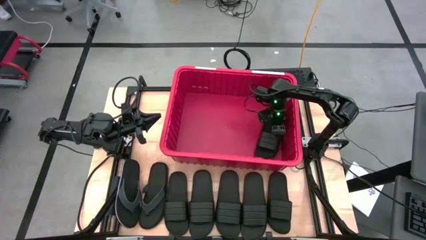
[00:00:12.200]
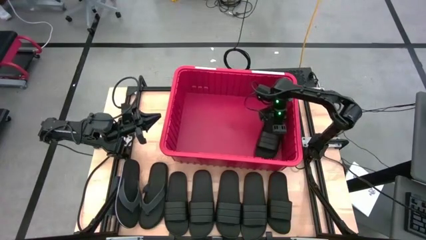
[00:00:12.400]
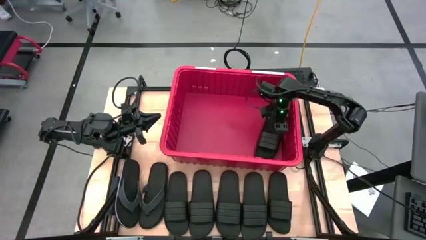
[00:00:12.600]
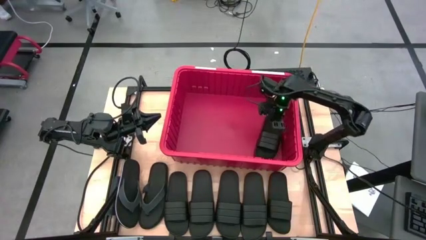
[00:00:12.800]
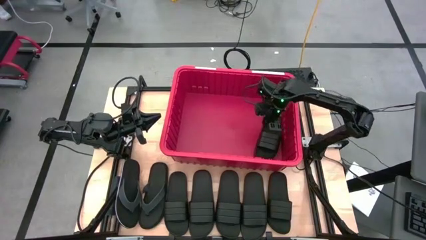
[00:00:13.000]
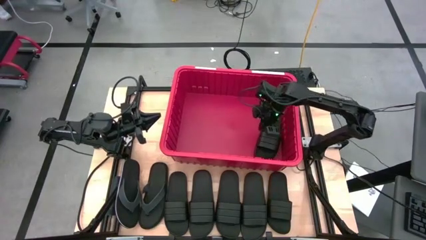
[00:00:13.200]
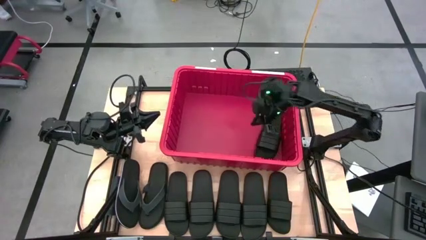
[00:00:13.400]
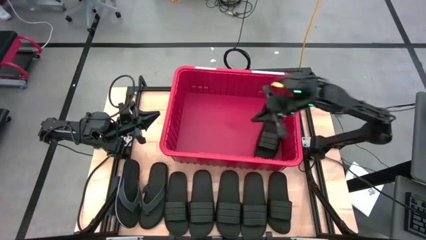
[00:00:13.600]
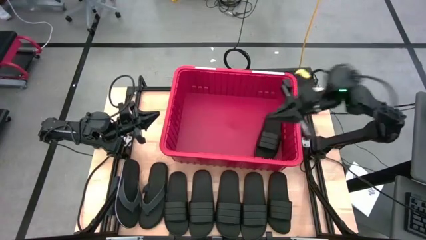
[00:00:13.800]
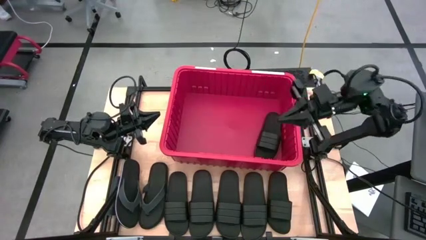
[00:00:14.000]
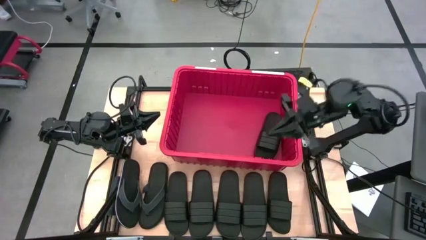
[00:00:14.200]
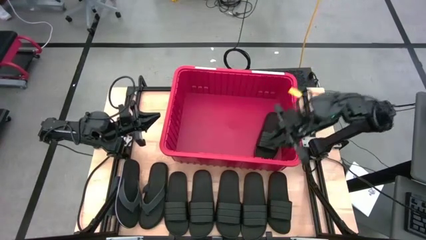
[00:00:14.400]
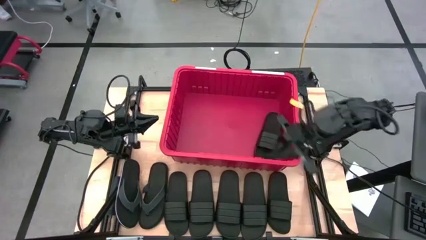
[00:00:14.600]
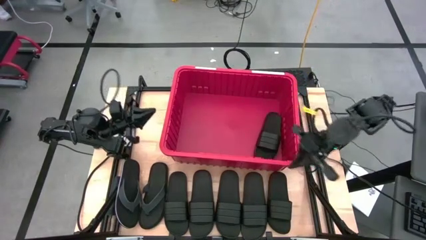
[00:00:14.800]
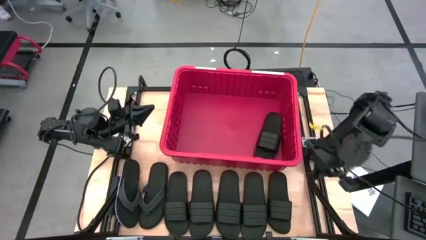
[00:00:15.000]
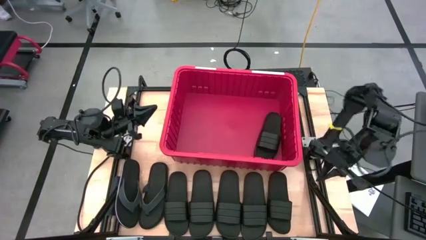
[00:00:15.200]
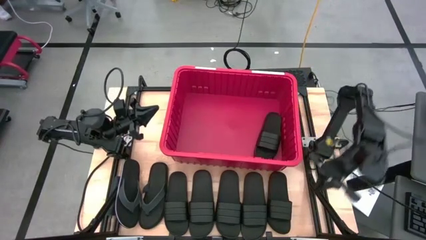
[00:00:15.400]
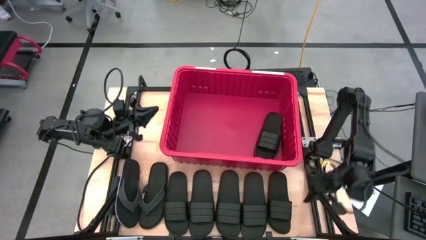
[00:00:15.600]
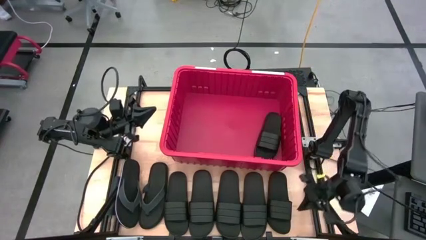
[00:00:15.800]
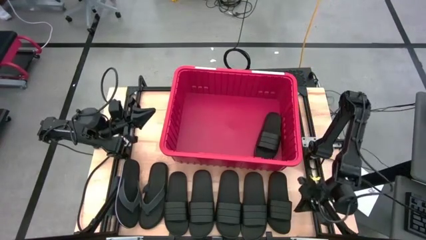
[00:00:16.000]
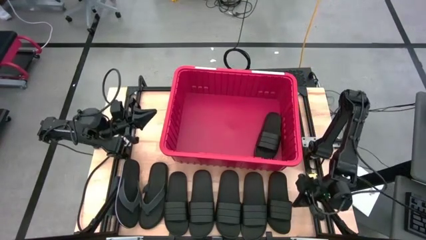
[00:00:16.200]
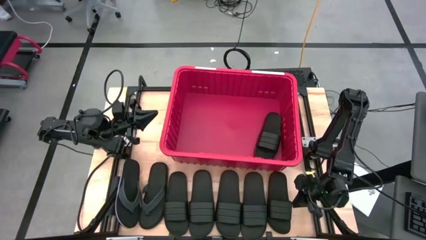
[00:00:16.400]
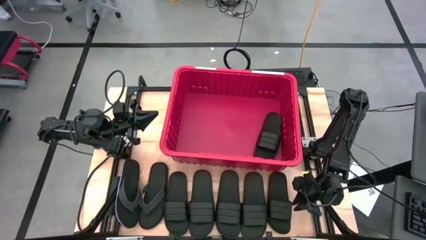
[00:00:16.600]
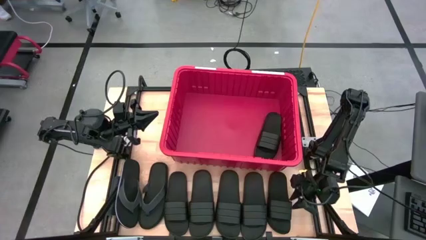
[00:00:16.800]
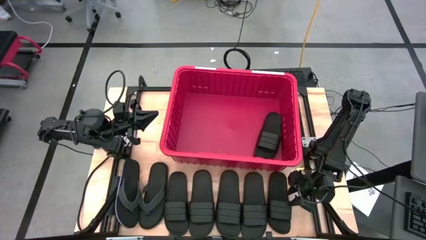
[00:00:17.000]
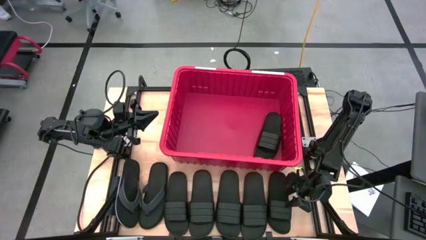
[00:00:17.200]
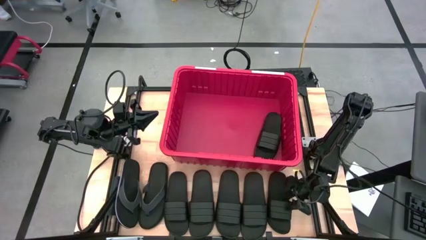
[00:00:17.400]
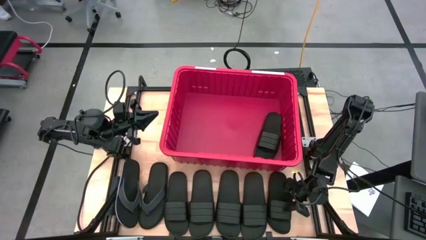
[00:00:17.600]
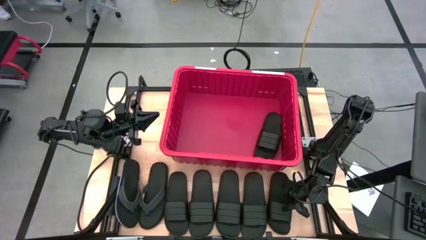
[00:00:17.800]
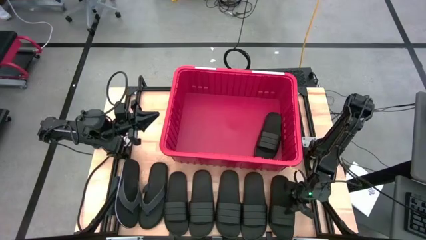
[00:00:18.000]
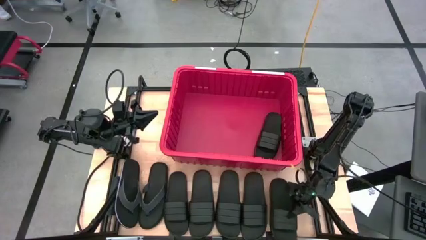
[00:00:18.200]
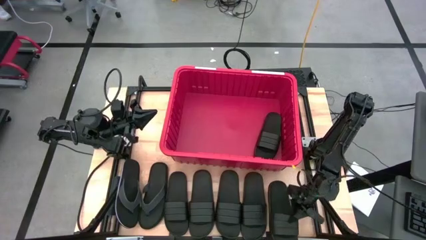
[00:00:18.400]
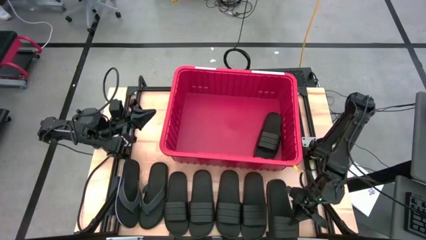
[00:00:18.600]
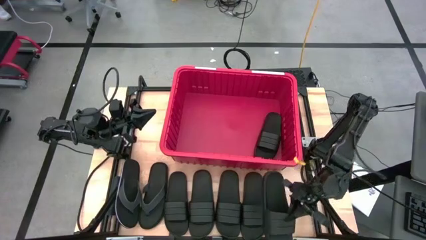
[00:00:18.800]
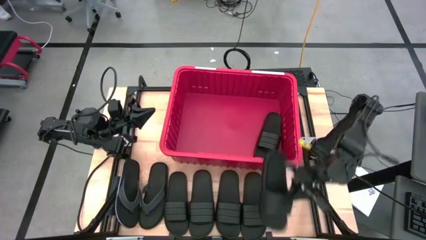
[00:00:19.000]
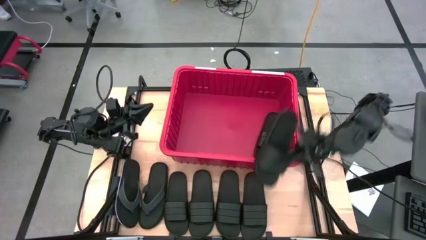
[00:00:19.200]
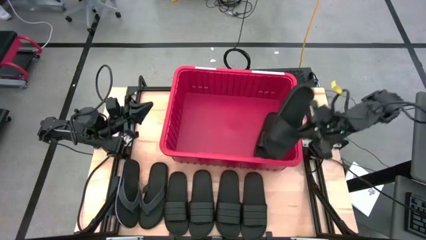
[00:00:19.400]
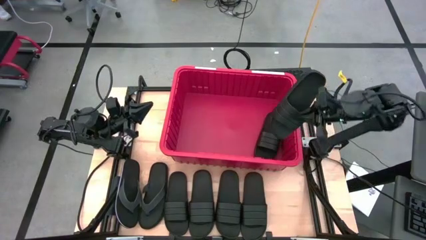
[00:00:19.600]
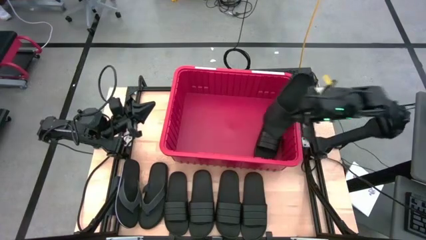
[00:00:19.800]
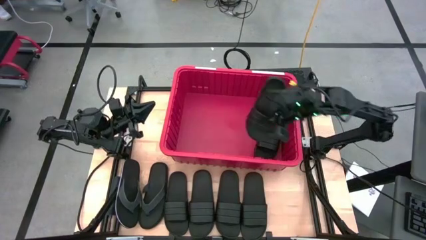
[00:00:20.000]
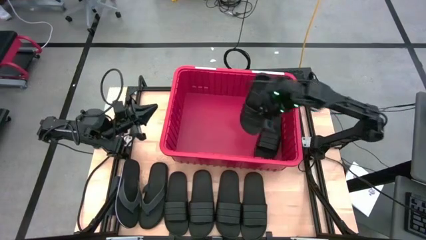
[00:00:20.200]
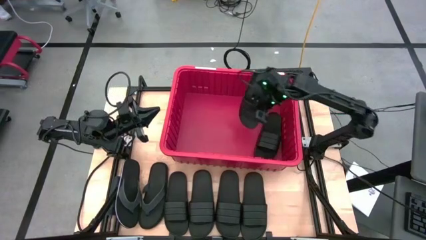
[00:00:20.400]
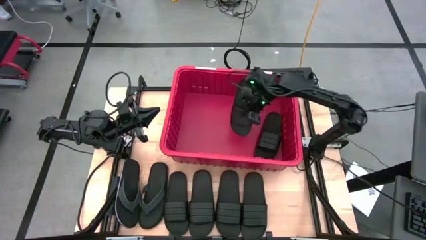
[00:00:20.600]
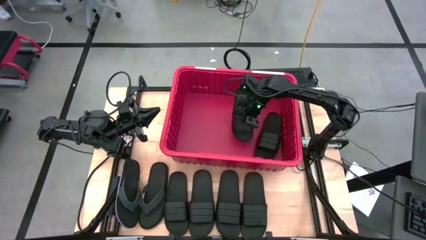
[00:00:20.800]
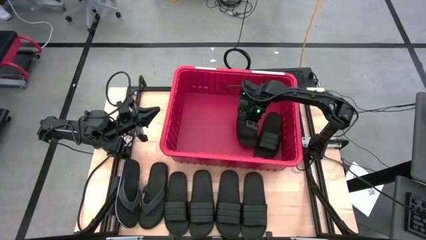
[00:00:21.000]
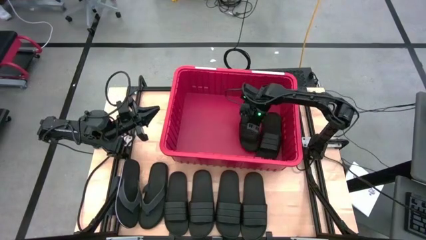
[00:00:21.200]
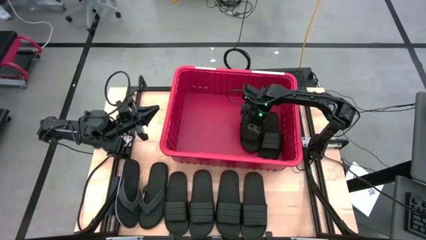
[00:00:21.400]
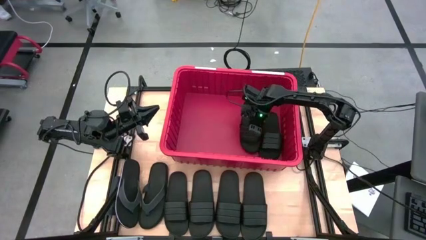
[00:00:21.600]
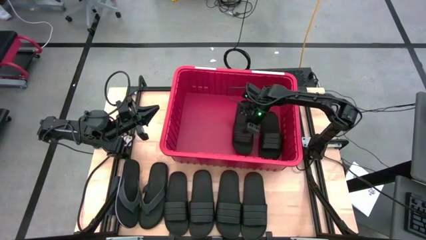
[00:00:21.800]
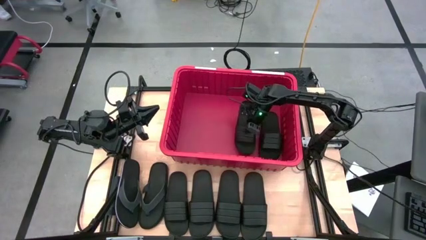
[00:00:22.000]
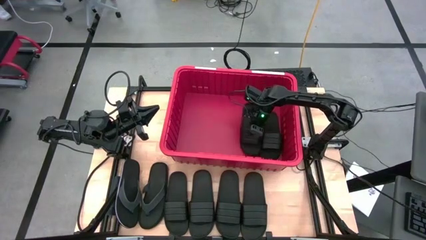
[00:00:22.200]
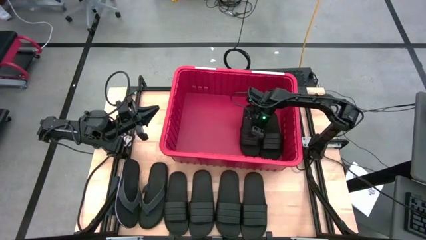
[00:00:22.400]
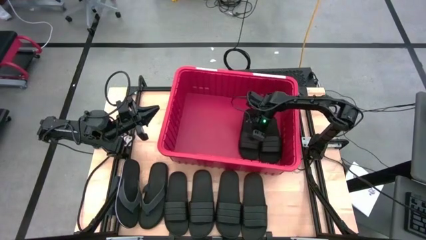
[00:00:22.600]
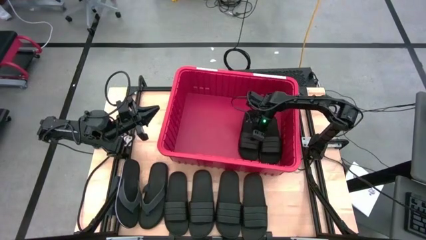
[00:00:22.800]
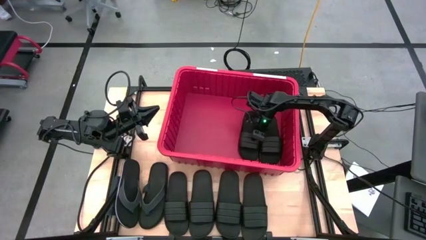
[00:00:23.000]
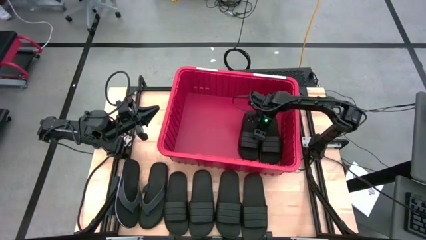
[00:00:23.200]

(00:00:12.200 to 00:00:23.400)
Task: Pick and place slides into bin
Put the black slide into the bin
